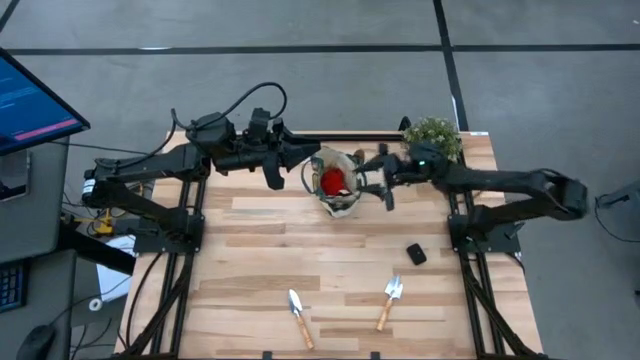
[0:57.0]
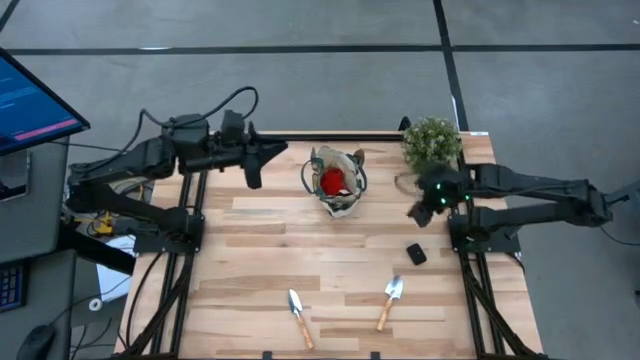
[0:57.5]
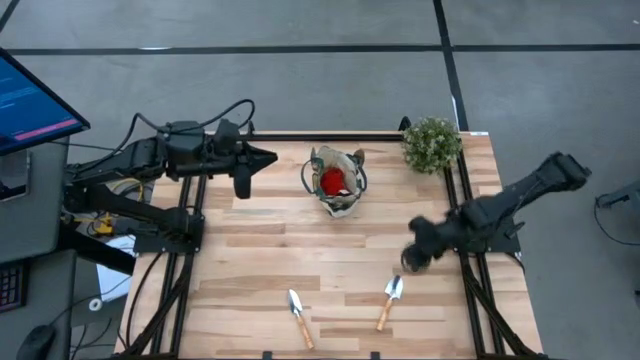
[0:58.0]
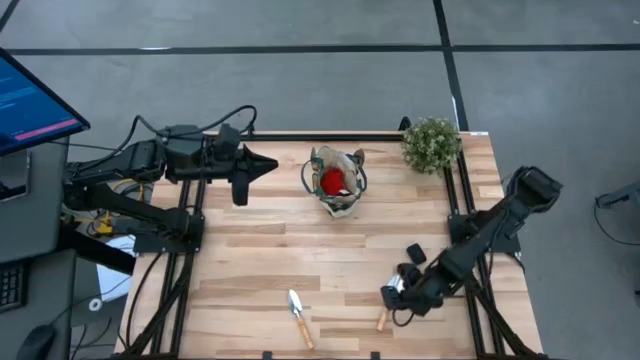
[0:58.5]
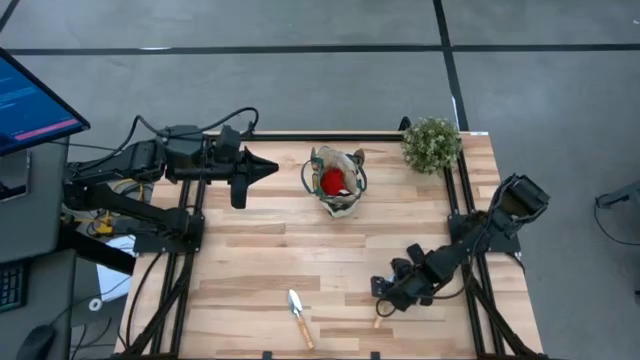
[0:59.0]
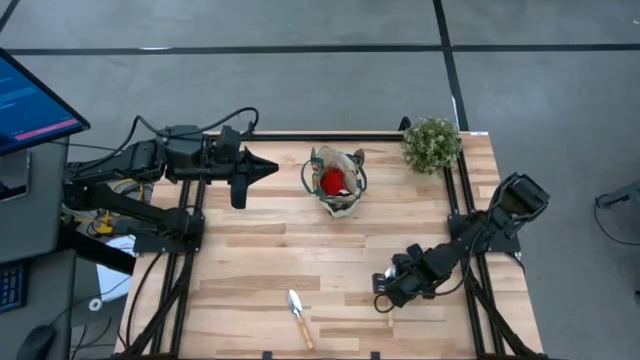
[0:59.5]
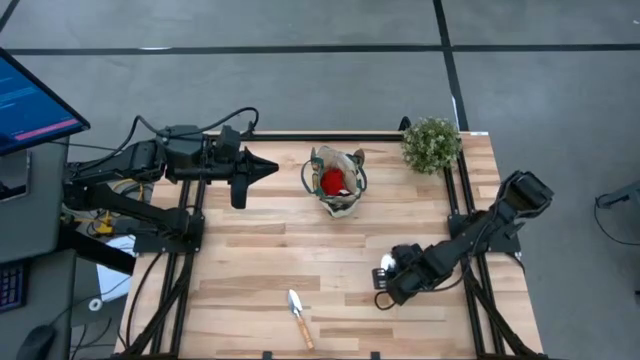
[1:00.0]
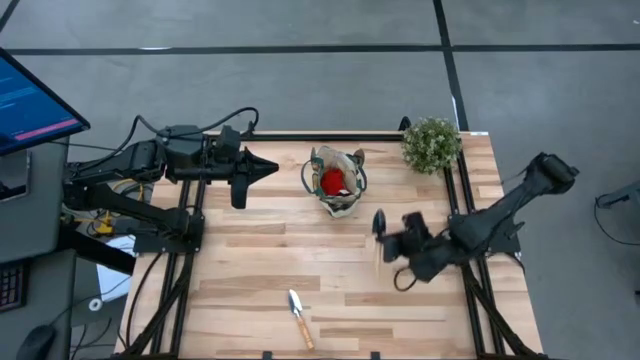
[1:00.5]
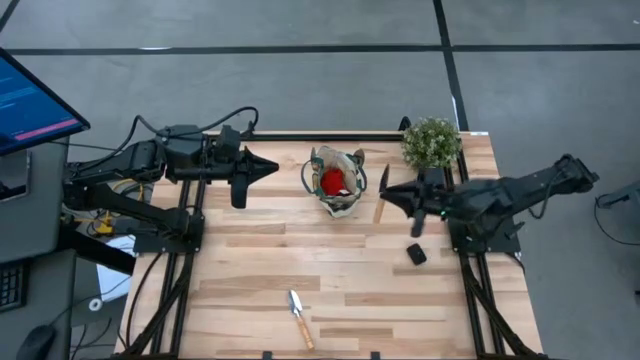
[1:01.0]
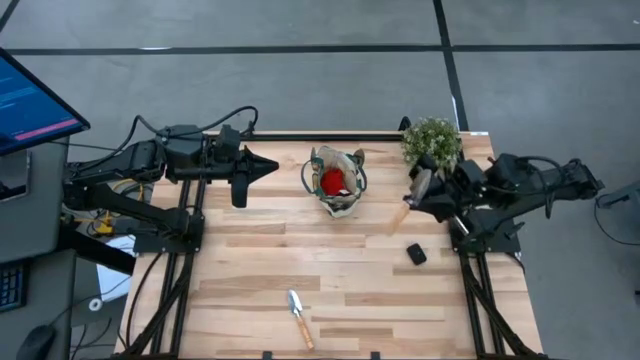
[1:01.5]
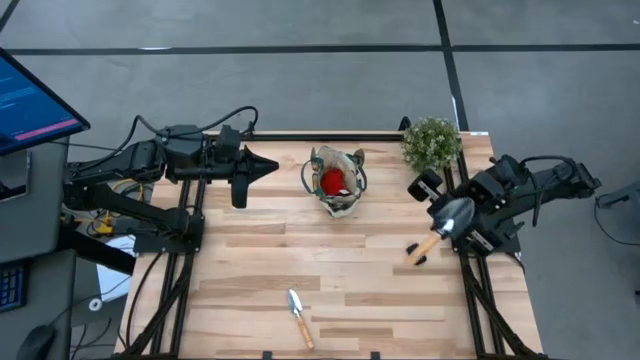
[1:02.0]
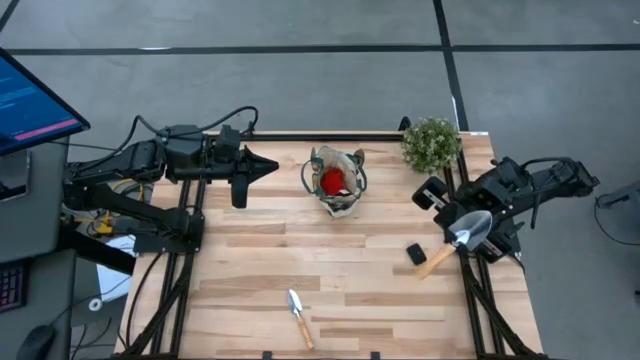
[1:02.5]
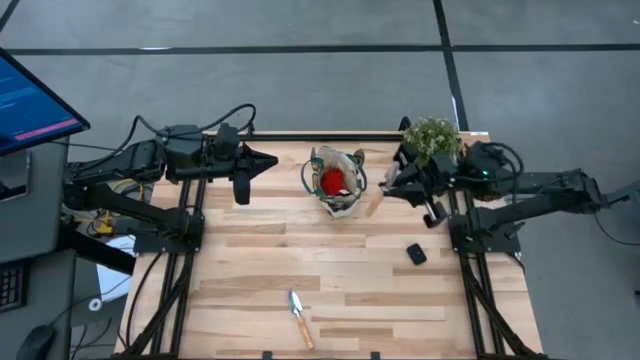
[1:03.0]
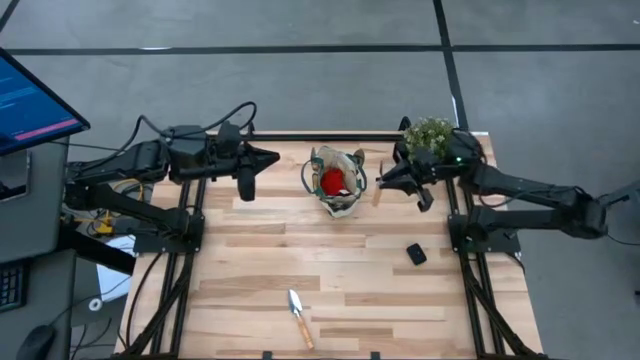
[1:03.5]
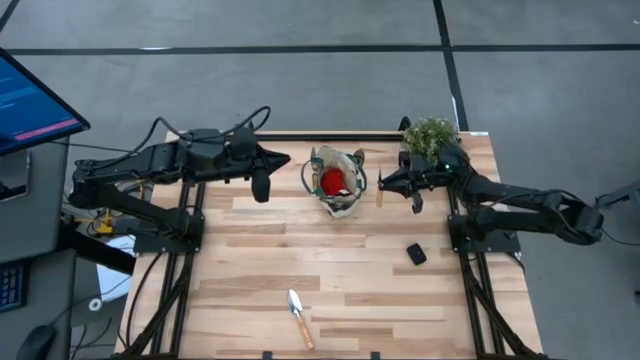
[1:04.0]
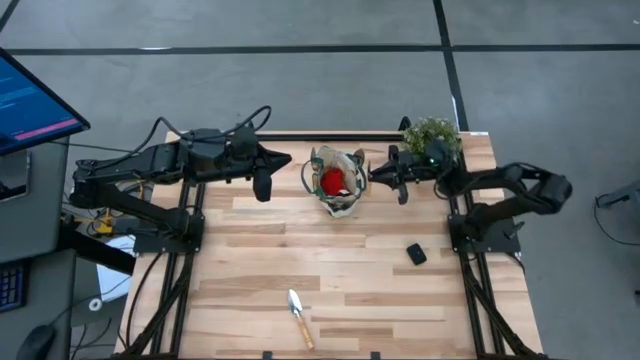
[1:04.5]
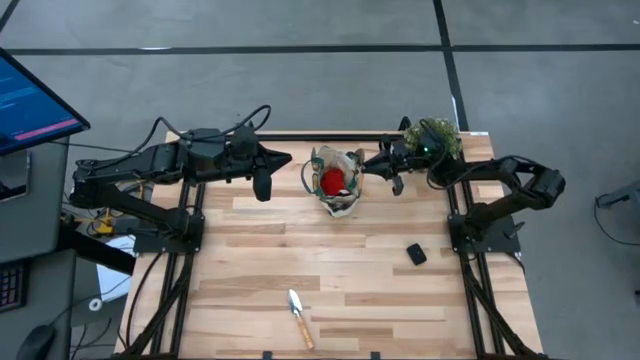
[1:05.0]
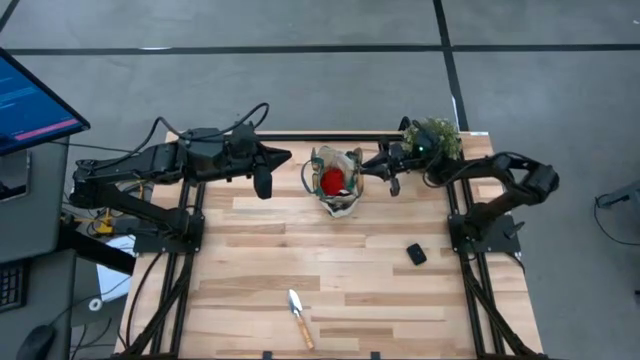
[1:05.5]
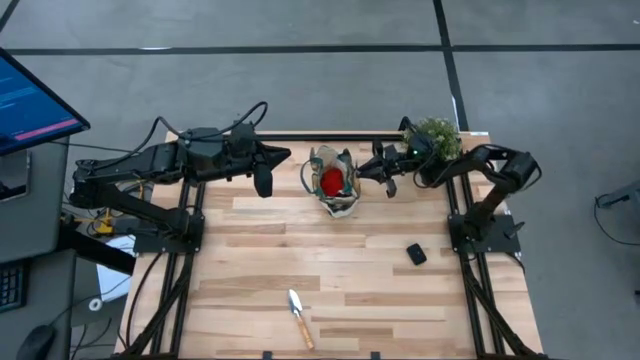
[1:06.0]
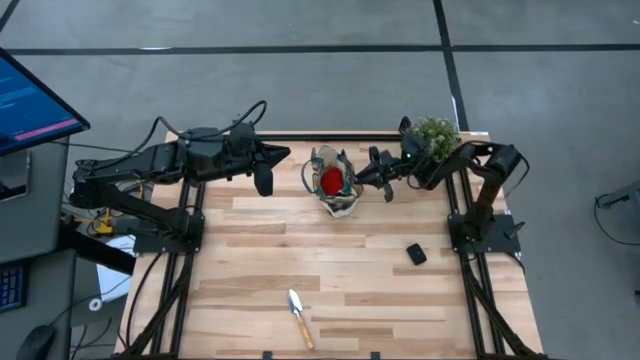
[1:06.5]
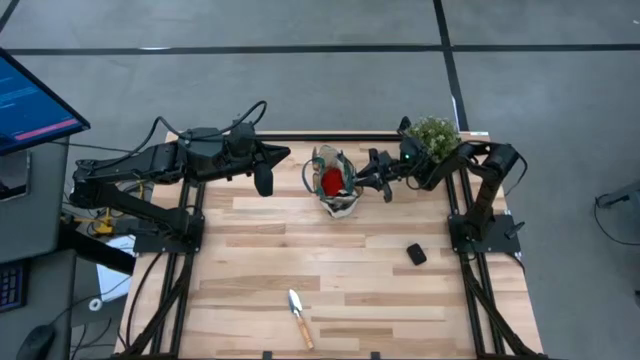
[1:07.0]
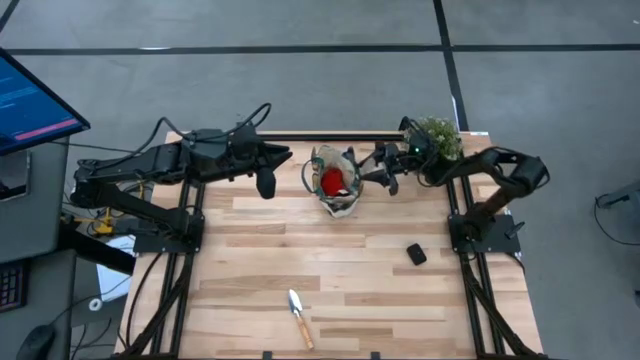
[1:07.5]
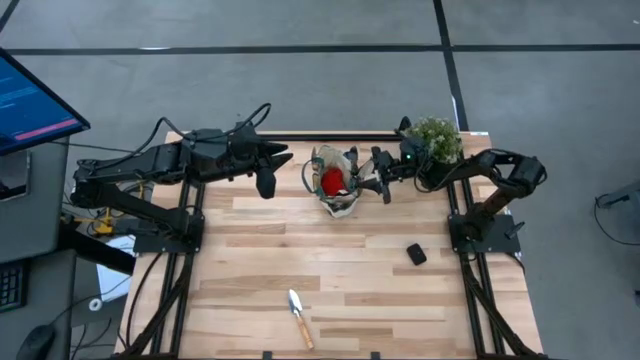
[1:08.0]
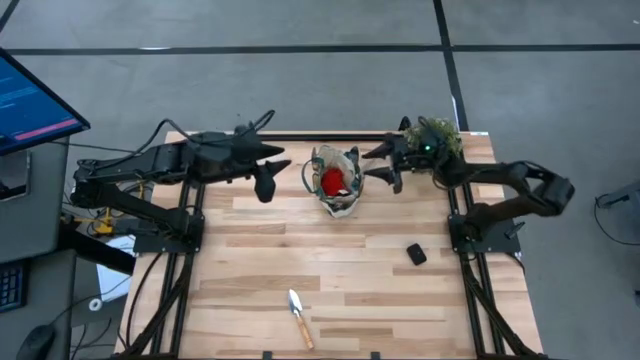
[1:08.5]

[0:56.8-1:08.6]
Task: Pick & Place Garden tools in Gardening bag
Put the brown trowel into the green gardening bag

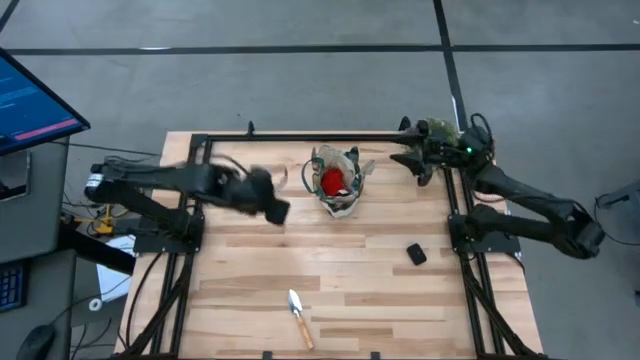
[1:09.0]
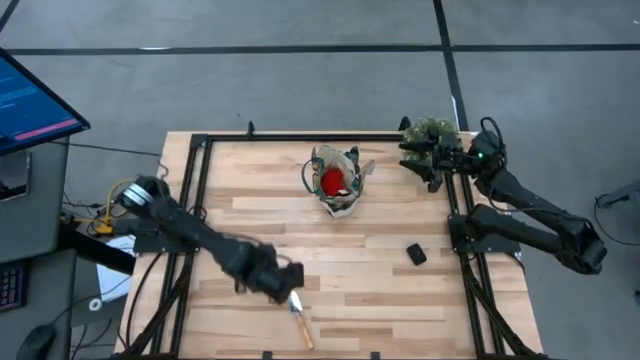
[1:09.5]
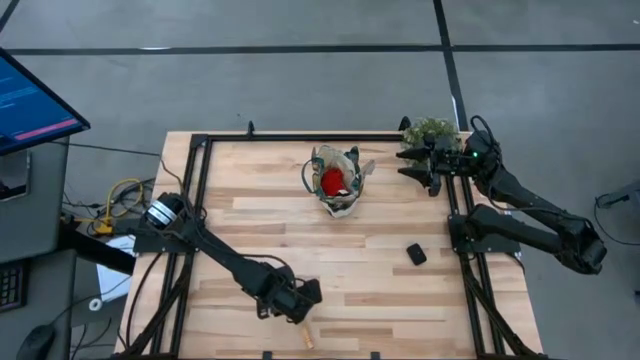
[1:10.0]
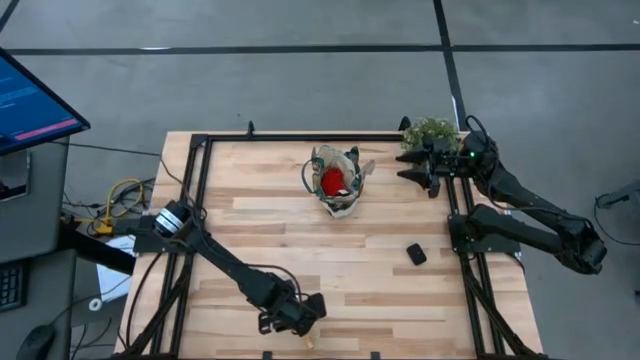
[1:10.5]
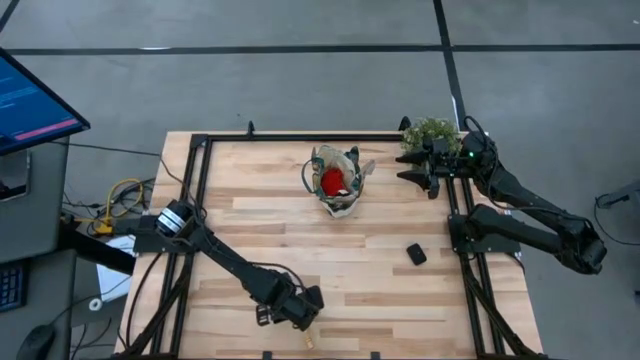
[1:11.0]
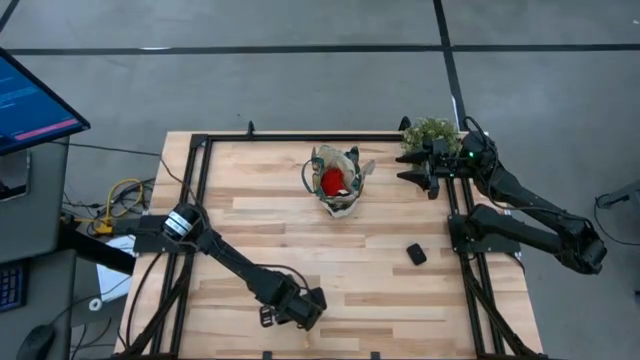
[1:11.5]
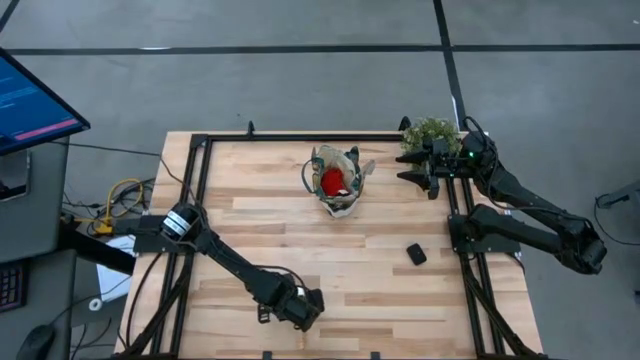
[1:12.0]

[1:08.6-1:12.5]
Put the brown trowel into the green gardening bag

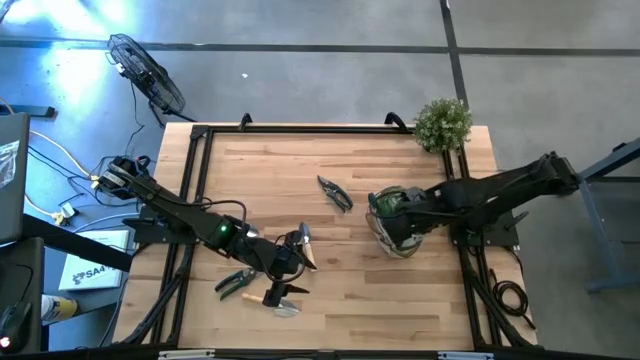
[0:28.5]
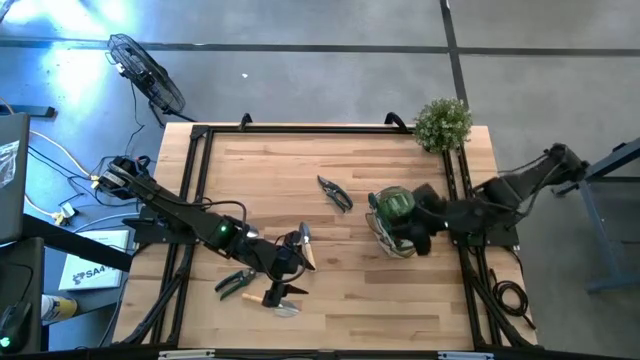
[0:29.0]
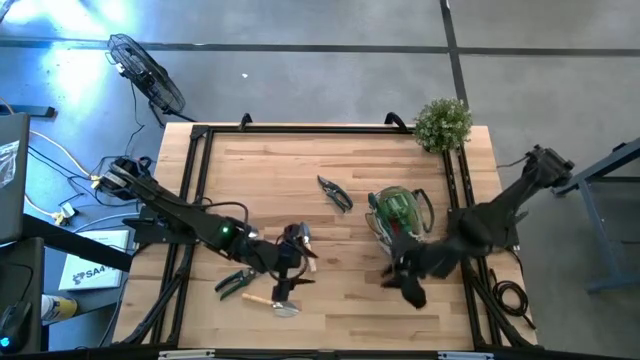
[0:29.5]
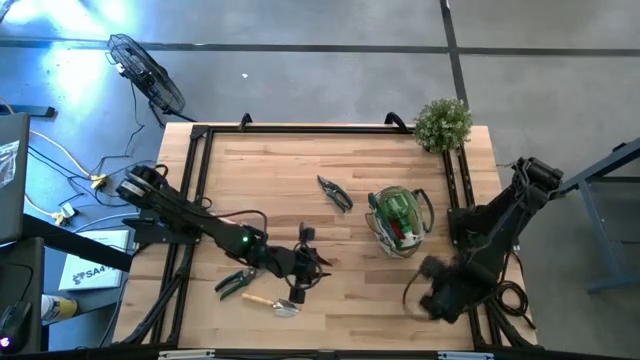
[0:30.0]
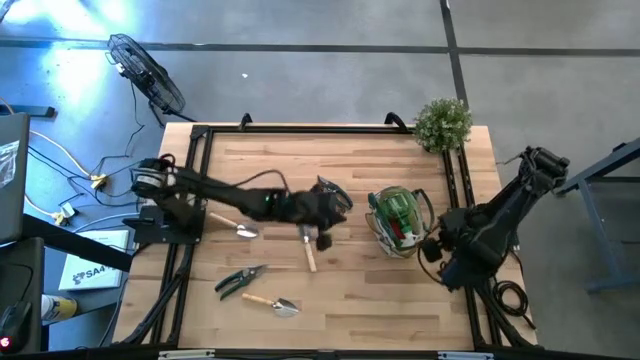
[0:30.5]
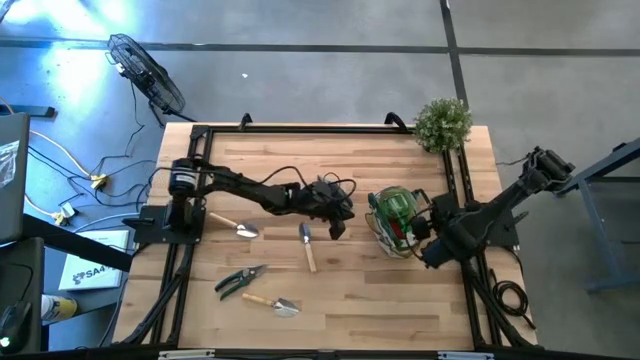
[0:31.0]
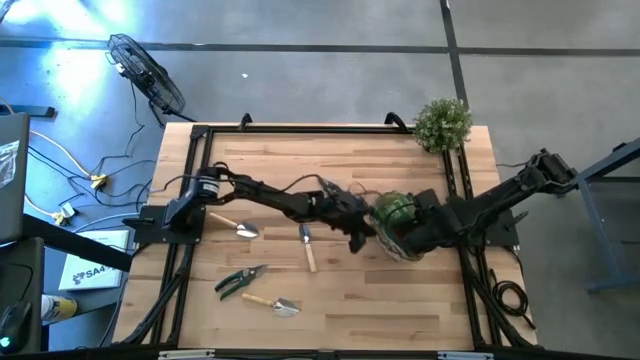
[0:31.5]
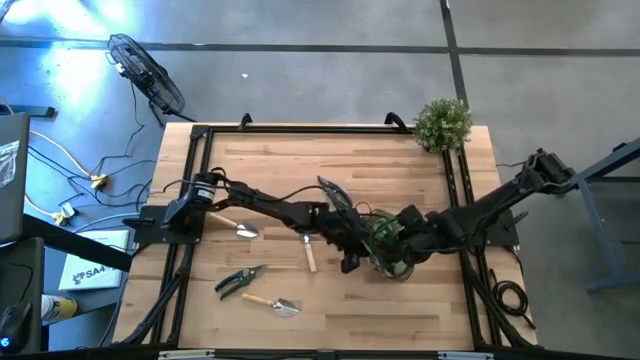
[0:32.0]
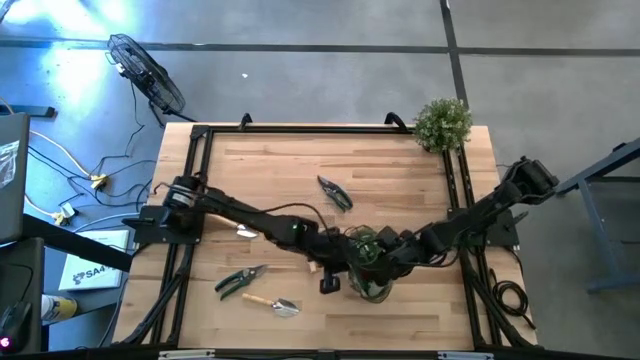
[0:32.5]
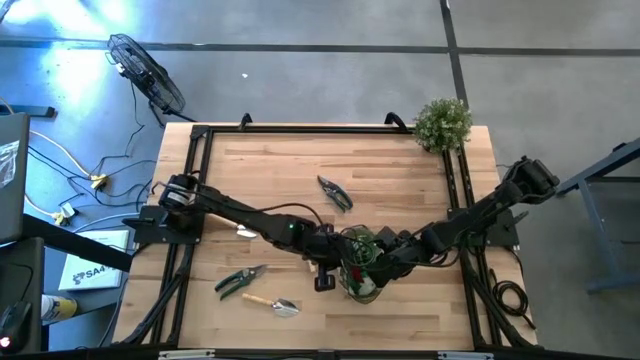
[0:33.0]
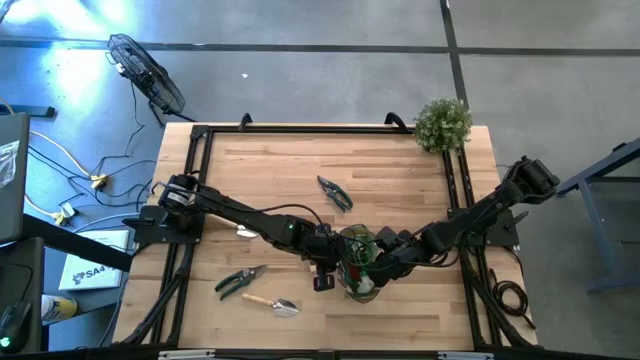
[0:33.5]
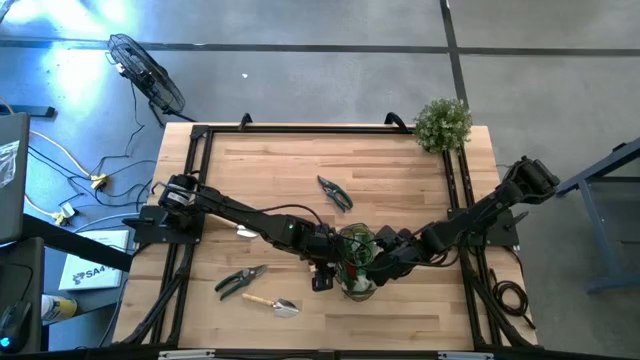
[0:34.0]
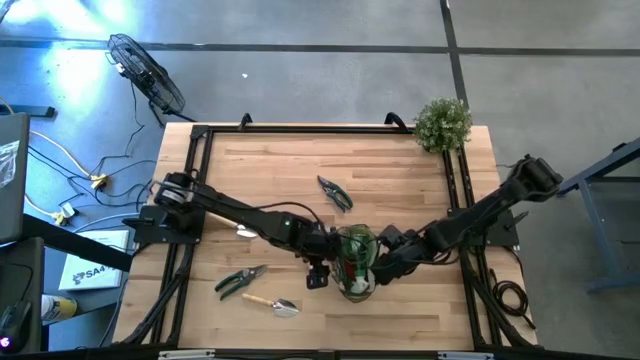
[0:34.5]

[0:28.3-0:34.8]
Task: Pick & Place Garden tools in Gardening bag
Move the gardening bag to the center of the table
